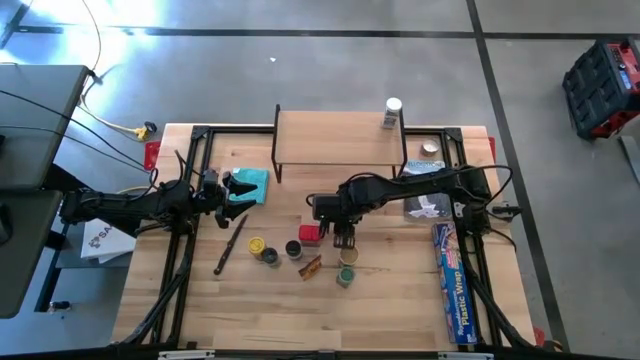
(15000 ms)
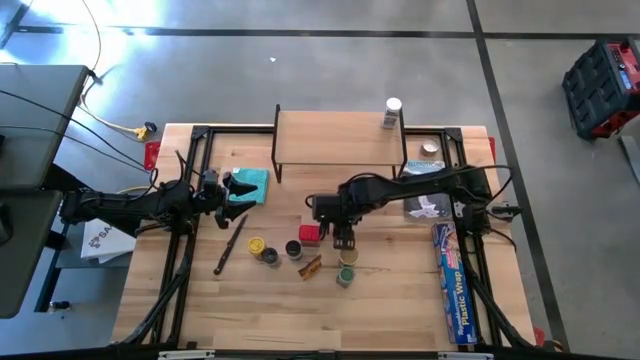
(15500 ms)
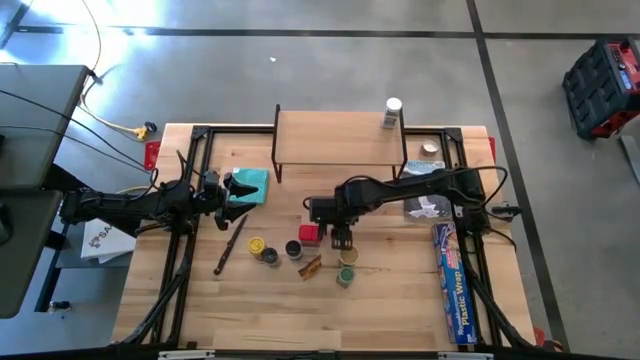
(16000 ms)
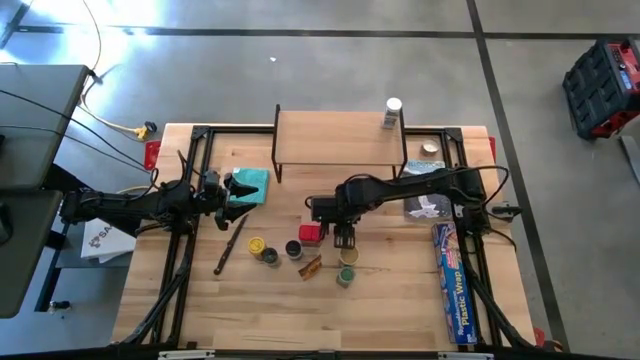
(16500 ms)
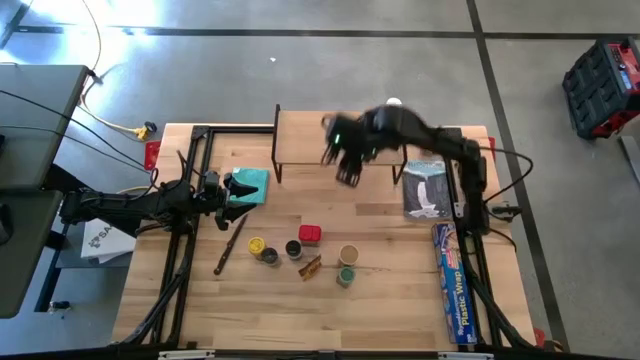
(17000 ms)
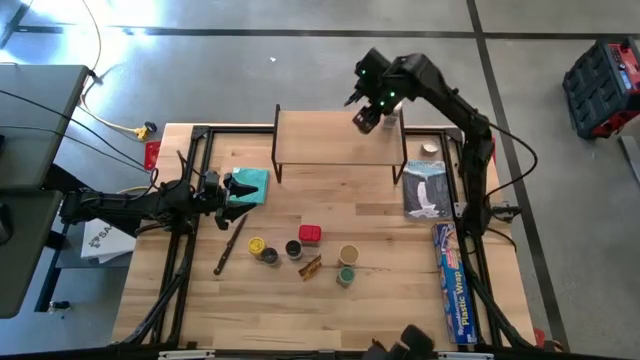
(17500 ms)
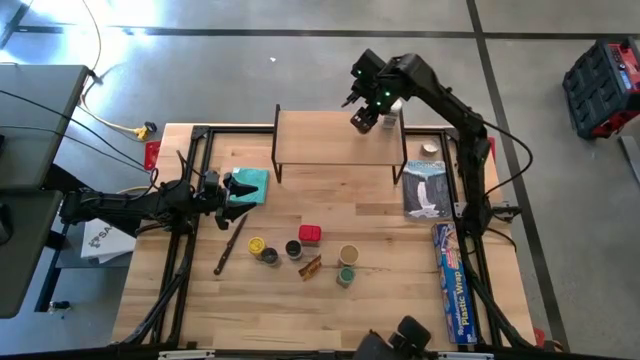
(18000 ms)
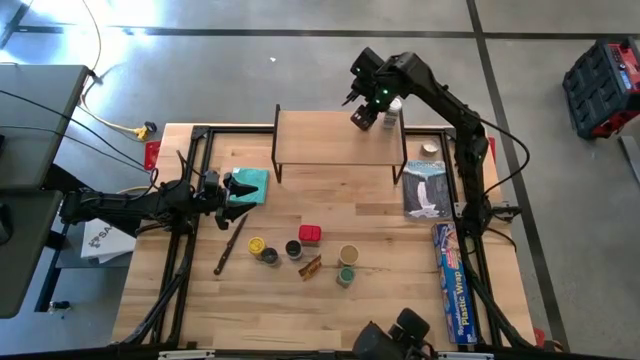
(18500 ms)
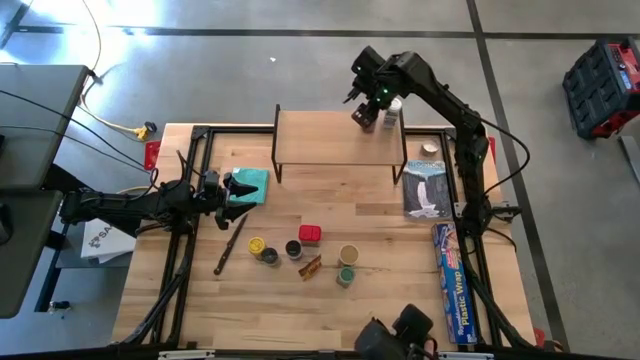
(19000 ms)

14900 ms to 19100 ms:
Task: Shelf spices
Put the orange spice bottle on the shelf

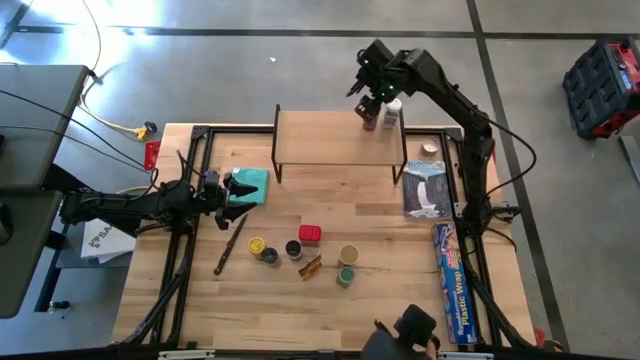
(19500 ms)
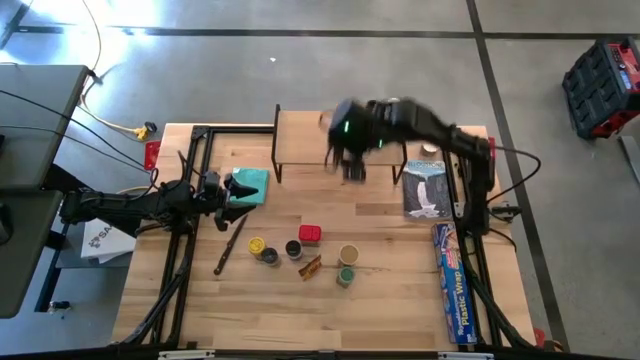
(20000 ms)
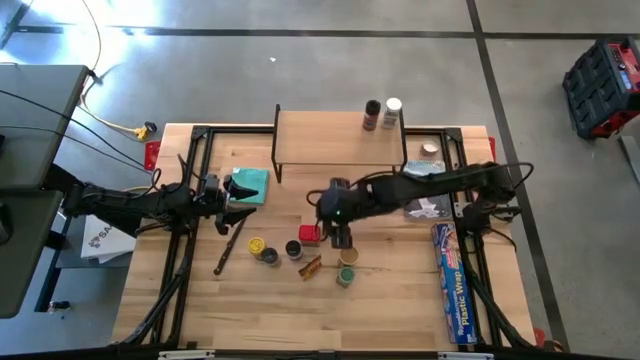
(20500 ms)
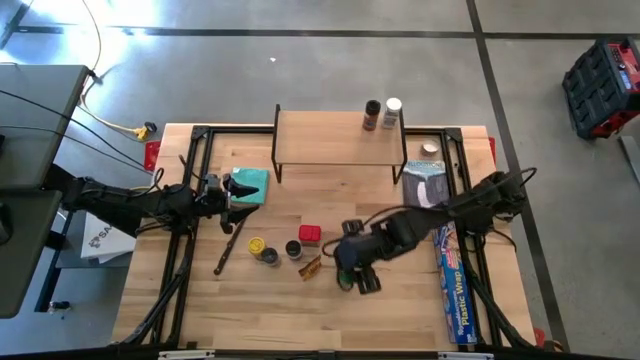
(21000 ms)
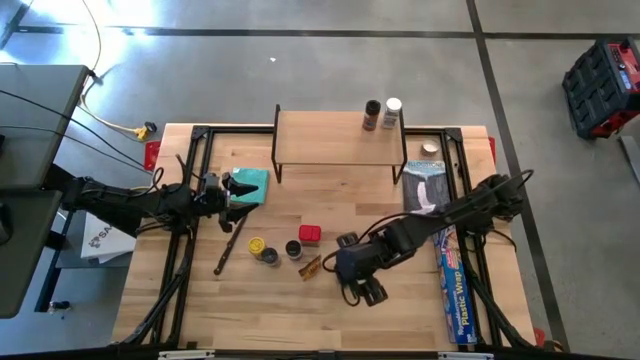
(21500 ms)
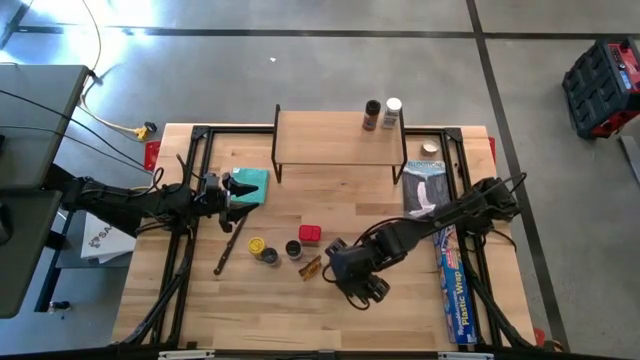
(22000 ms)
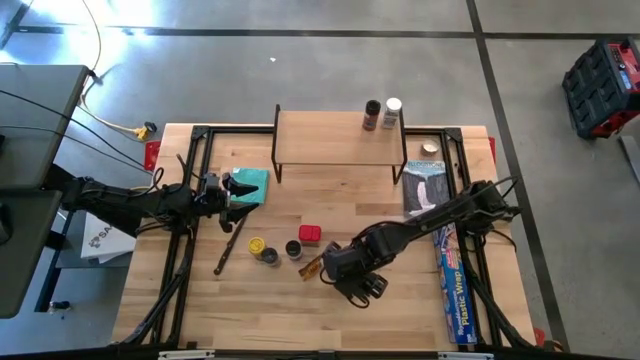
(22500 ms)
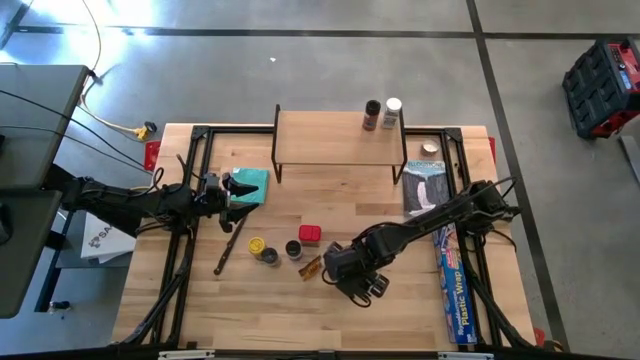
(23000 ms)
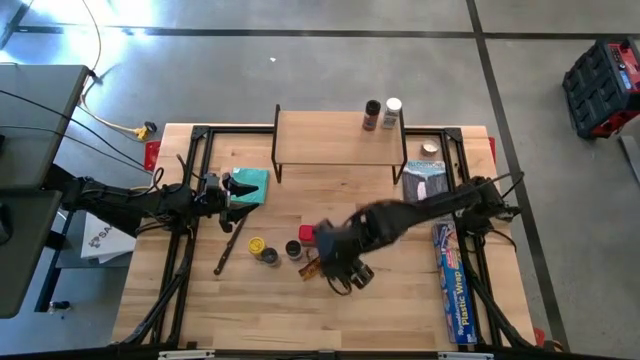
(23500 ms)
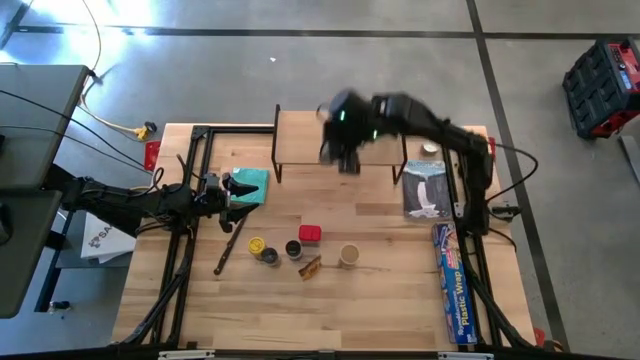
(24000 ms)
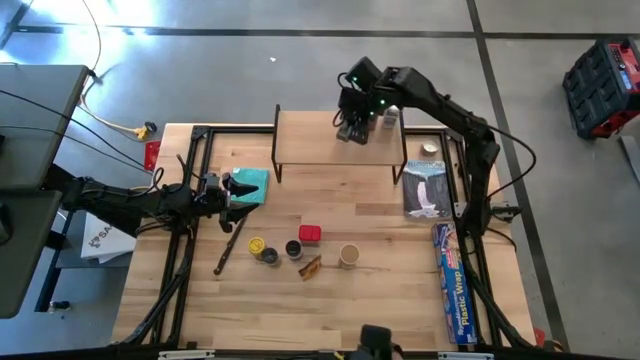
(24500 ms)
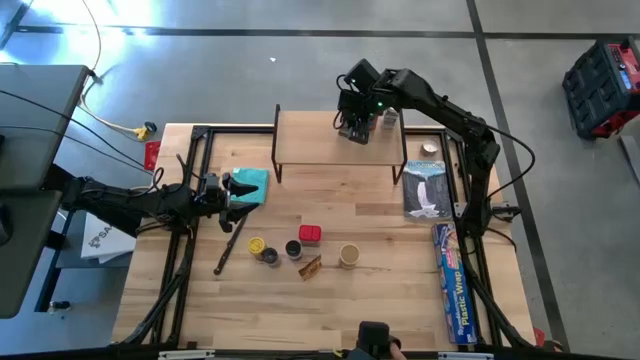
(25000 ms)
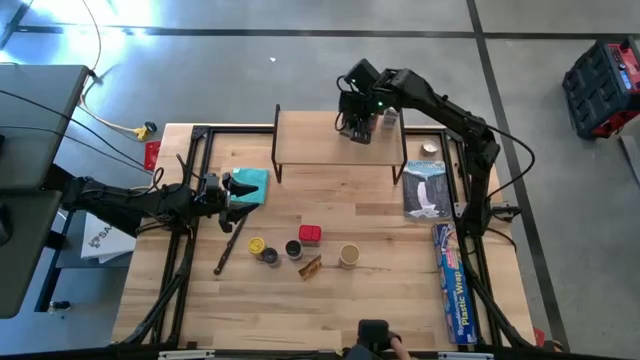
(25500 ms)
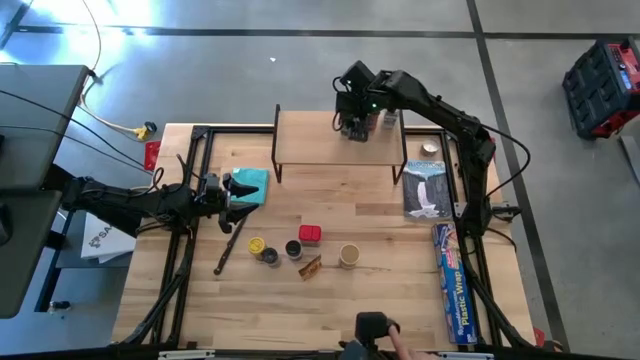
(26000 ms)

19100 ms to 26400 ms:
Put the green spice bottle on the shelf

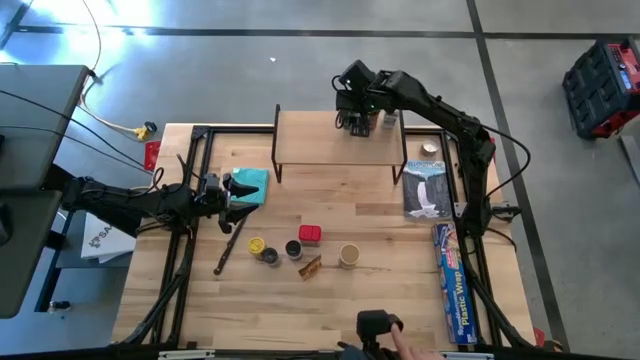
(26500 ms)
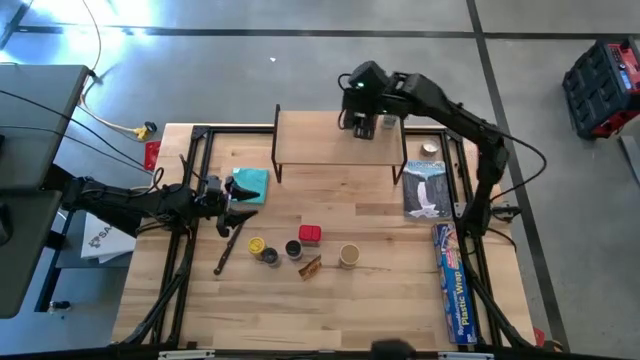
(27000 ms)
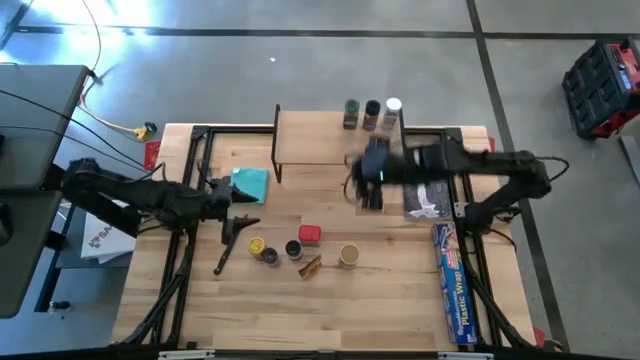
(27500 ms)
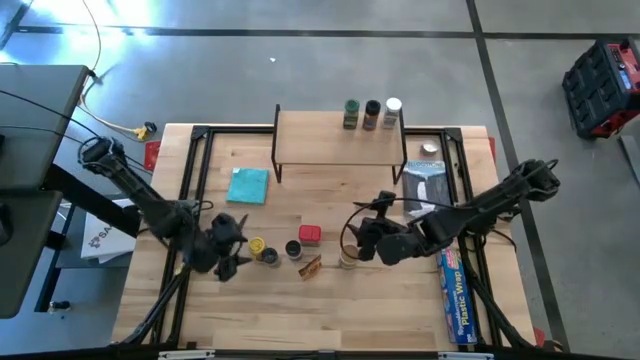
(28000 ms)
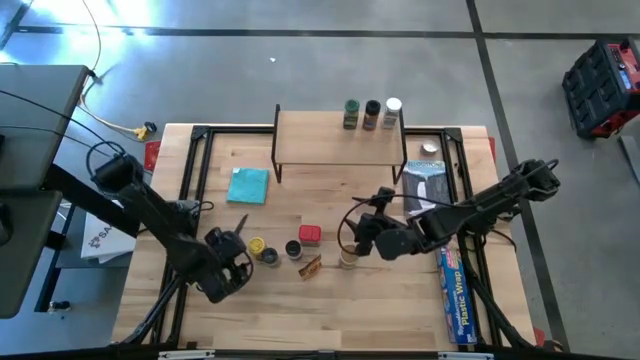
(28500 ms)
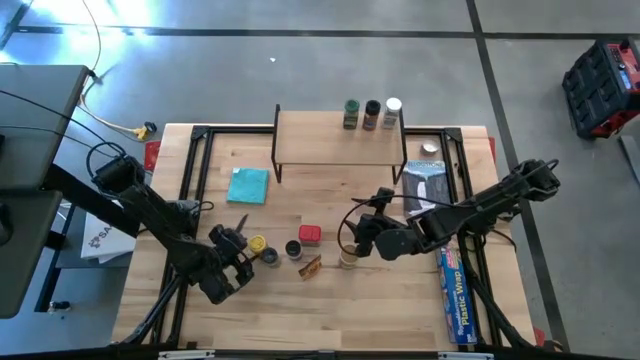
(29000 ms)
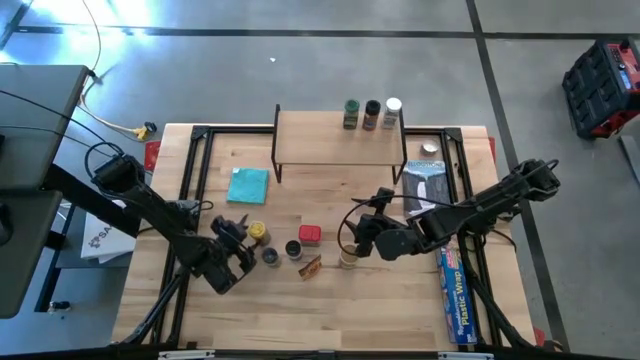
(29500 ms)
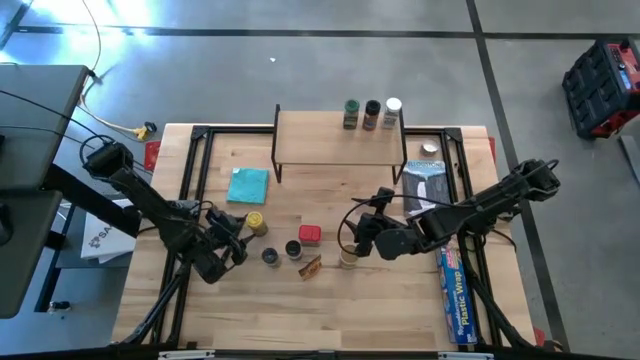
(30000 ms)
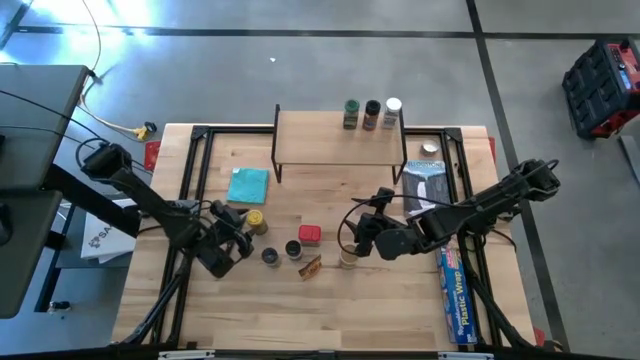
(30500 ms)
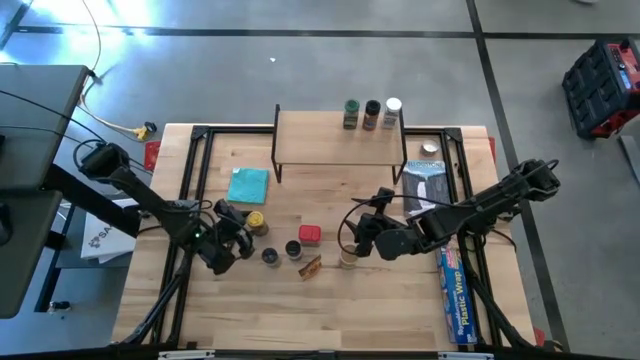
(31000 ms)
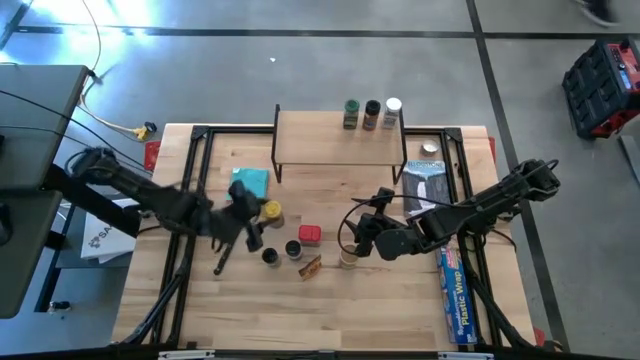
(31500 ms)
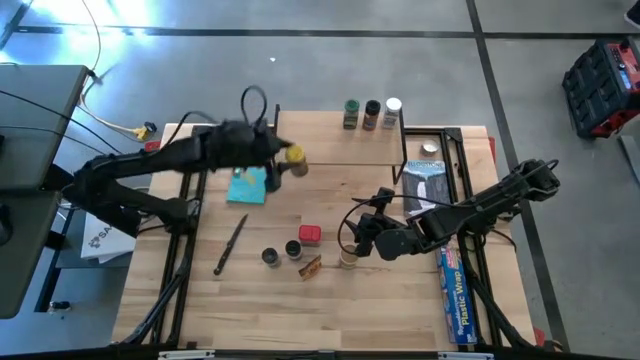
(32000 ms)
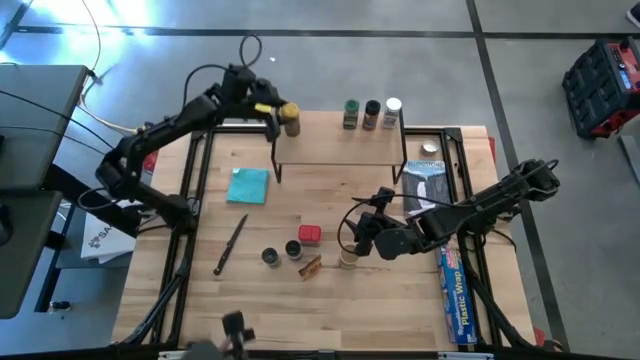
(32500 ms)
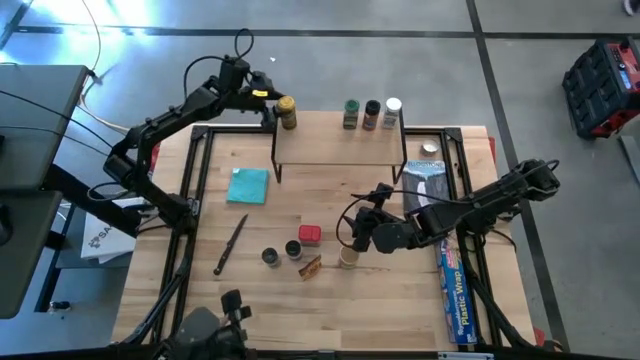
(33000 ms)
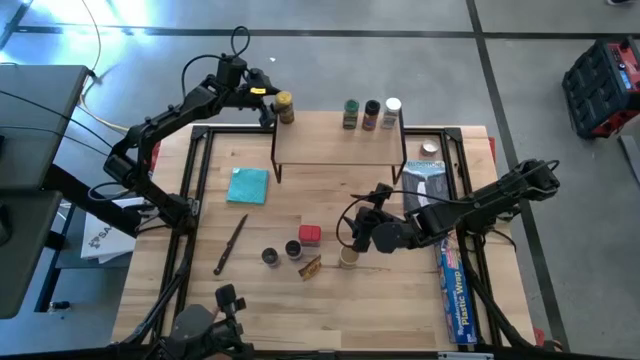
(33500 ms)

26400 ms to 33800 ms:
Put the yellow spice bottle on the shelf
